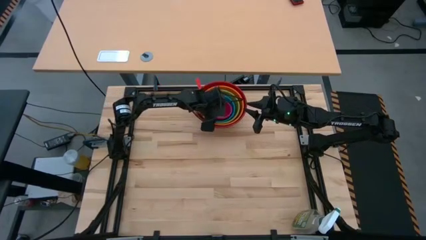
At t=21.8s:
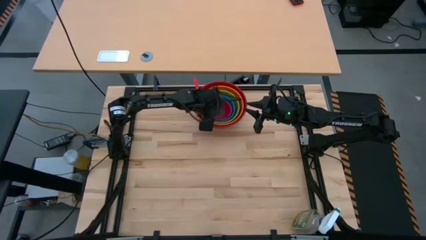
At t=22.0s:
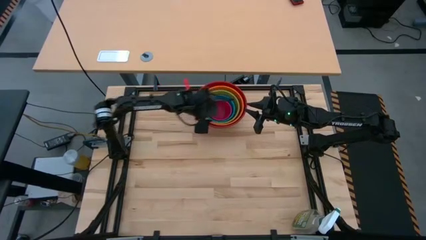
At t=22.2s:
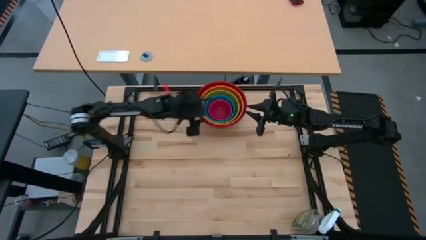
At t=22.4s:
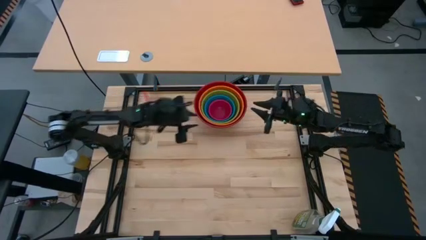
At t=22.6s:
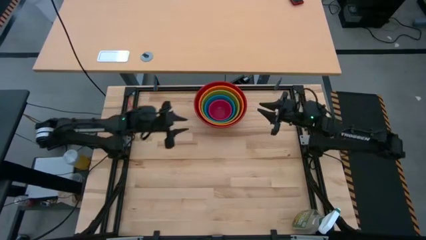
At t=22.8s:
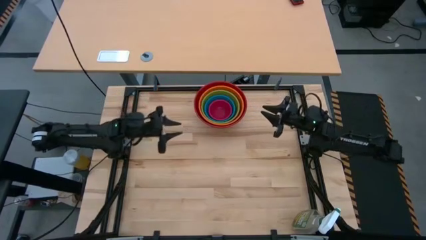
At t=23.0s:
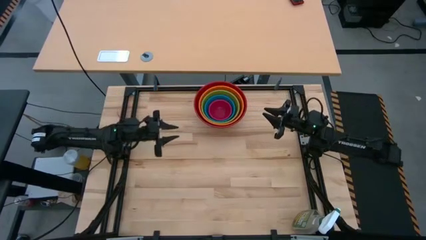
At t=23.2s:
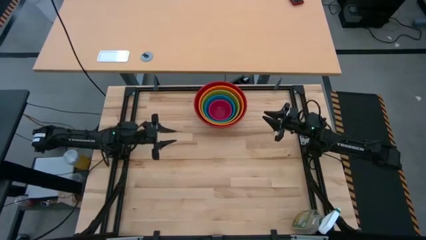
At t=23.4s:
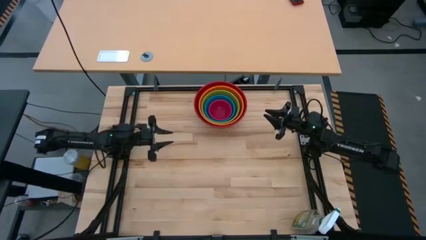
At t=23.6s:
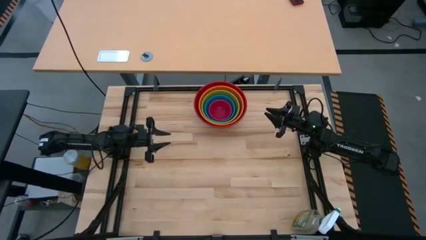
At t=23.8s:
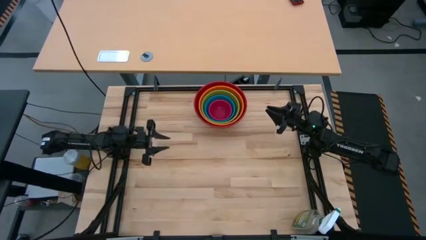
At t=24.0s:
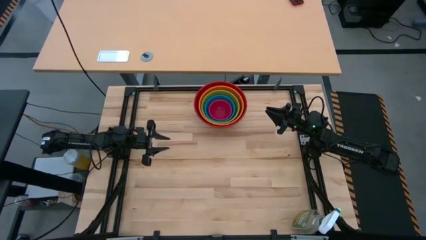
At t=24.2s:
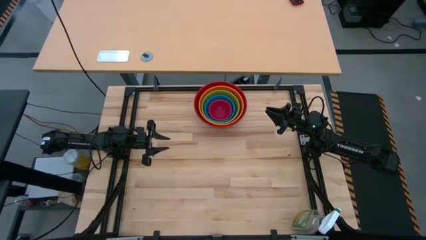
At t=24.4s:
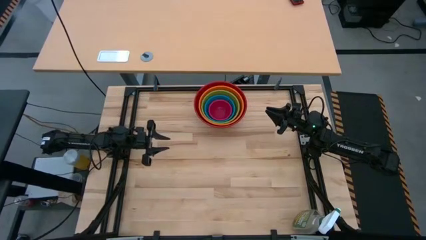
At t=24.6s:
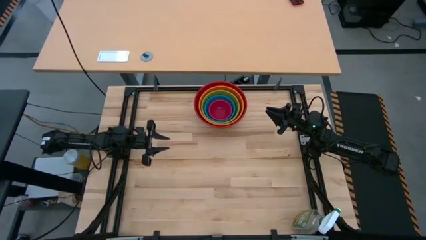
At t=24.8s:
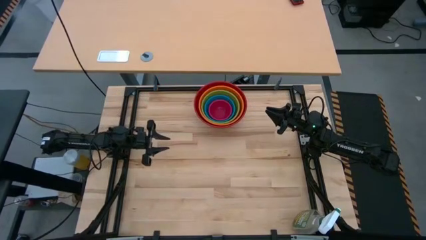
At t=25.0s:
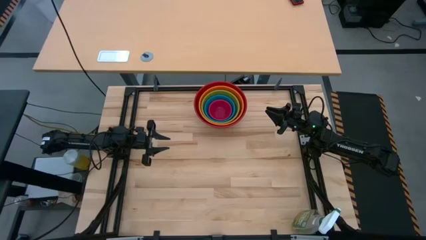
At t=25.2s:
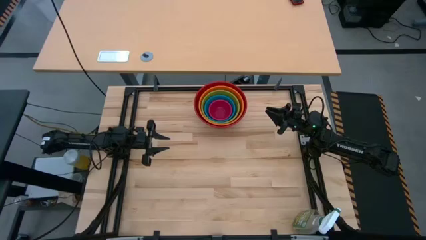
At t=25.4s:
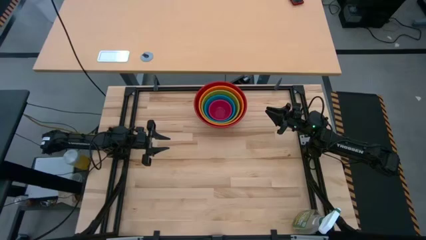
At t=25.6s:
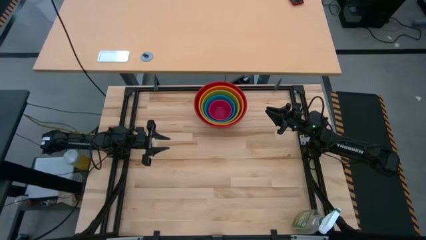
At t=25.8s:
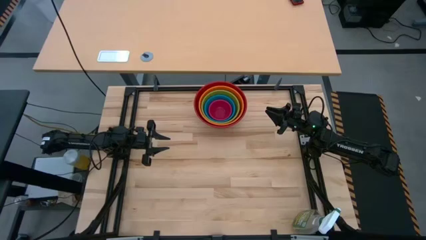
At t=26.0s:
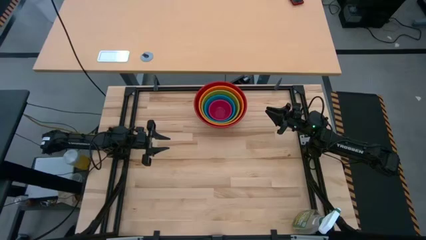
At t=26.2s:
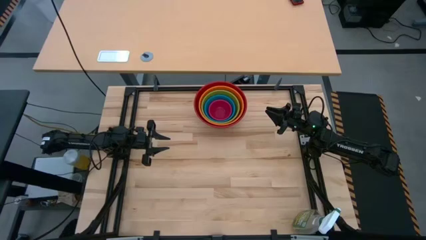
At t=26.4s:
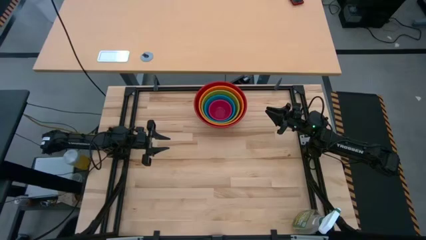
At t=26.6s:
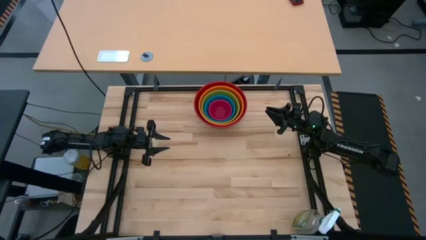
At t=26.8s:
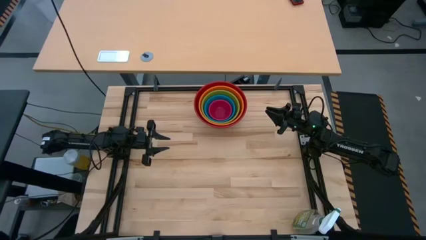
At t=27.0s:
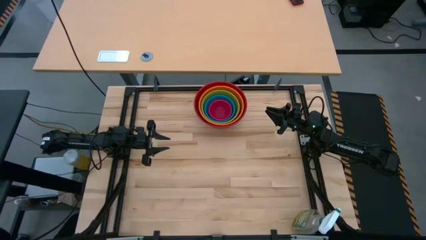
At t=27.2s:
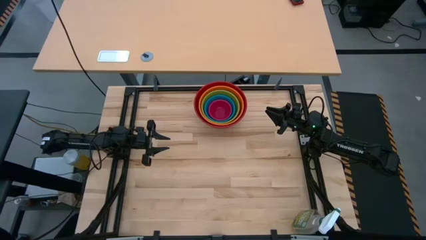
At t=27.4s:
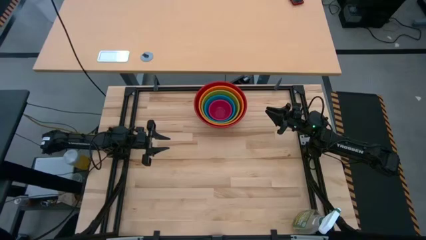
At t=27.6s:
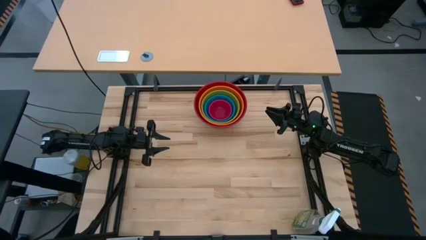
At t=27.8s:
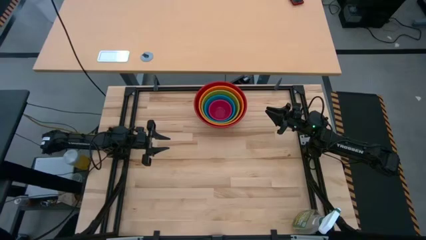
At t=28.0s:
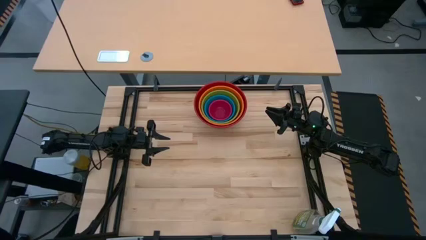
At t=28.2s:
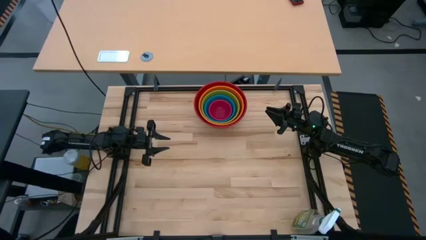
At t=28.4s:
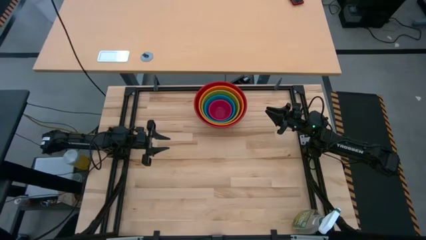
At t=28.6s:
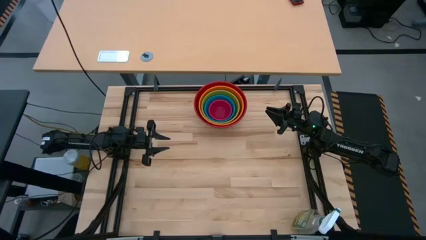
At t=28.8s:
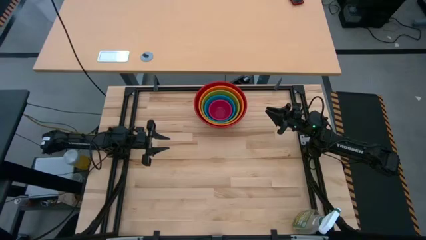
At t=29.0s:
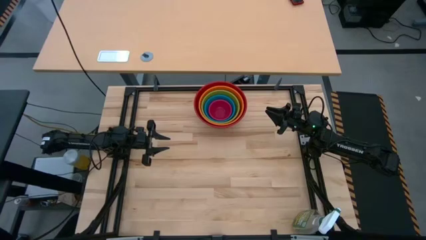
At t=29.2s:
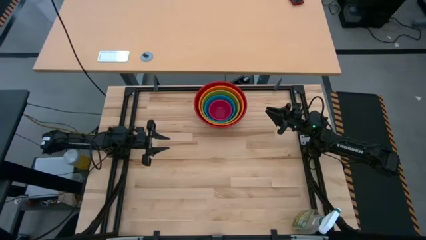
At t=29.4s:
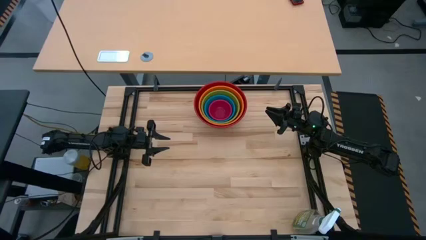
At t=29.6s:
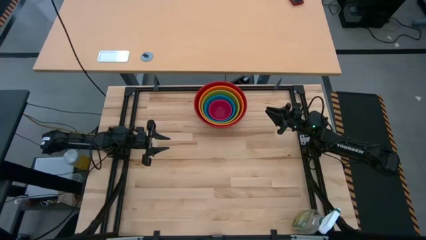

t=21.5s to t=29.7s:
Return to Home Position

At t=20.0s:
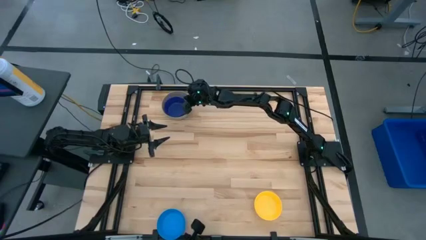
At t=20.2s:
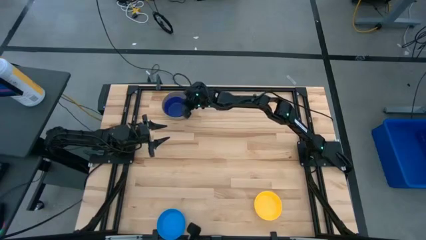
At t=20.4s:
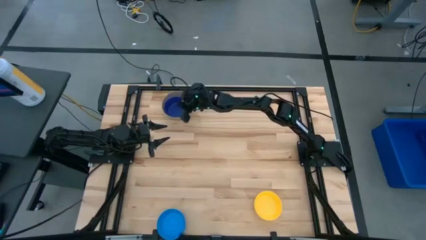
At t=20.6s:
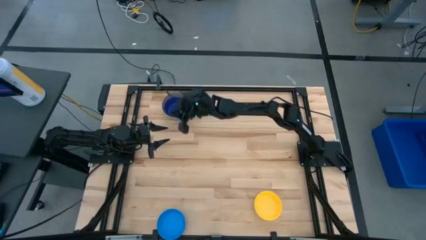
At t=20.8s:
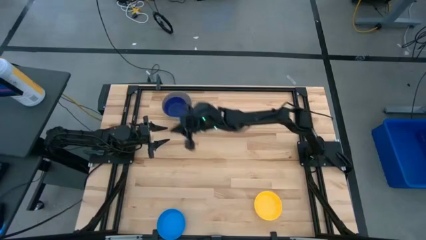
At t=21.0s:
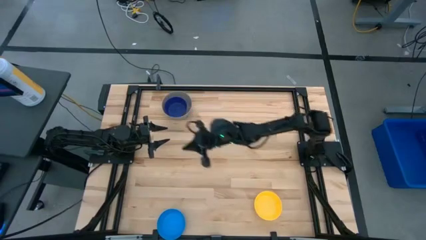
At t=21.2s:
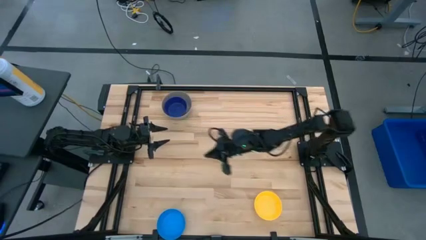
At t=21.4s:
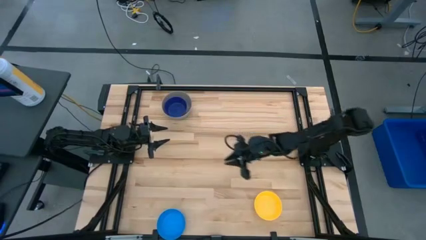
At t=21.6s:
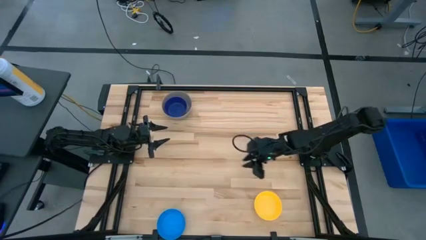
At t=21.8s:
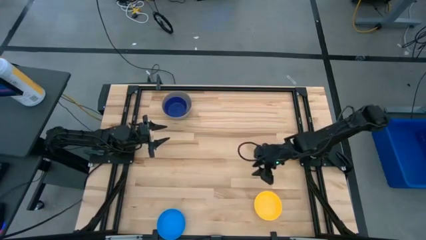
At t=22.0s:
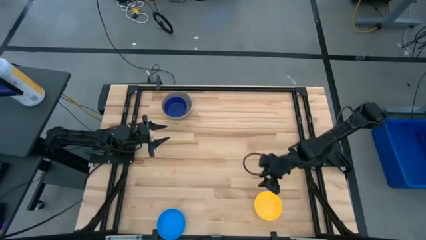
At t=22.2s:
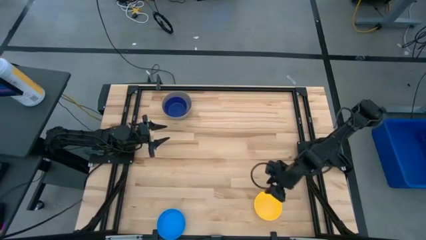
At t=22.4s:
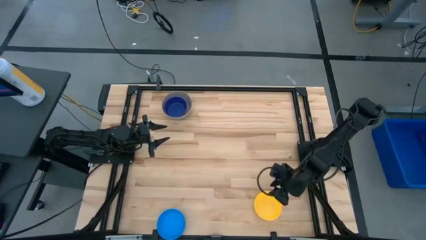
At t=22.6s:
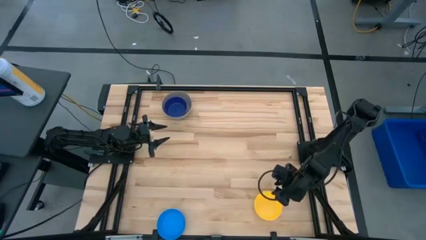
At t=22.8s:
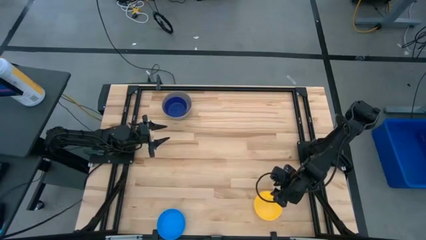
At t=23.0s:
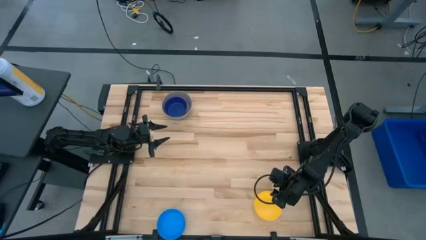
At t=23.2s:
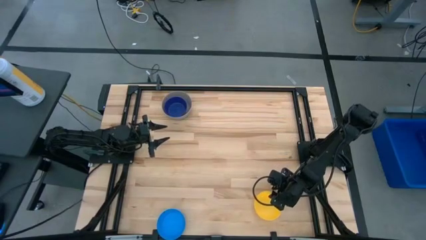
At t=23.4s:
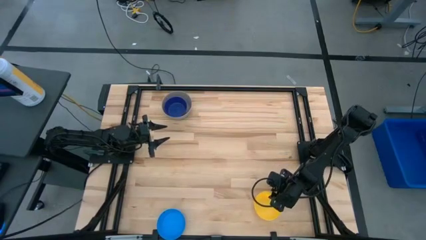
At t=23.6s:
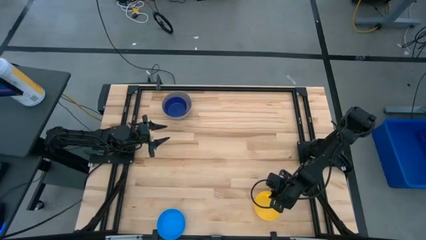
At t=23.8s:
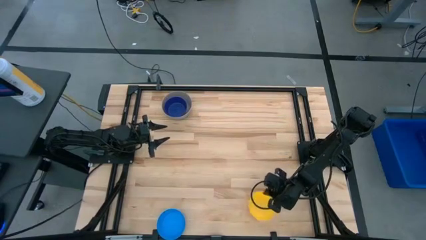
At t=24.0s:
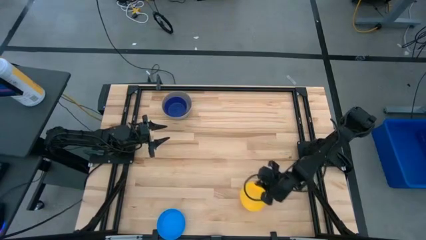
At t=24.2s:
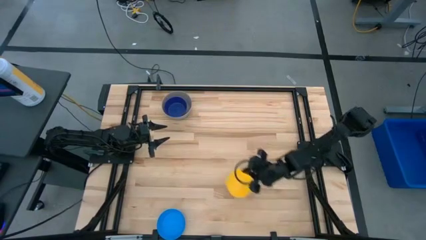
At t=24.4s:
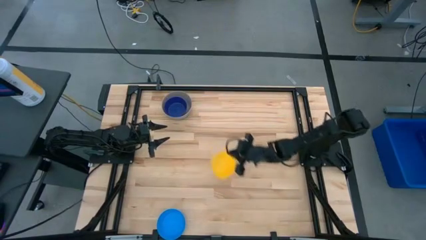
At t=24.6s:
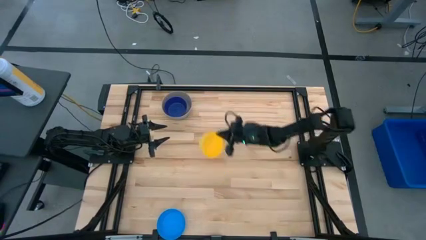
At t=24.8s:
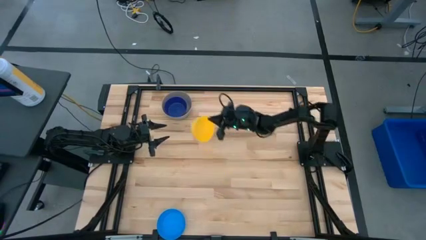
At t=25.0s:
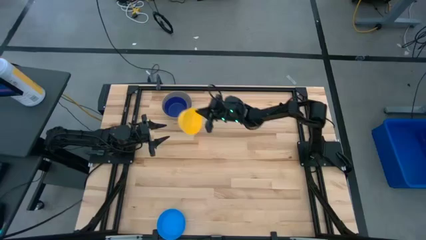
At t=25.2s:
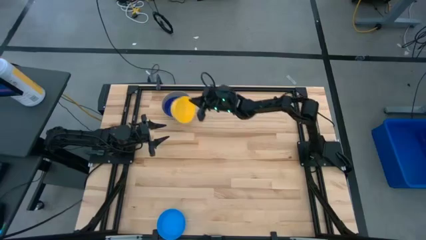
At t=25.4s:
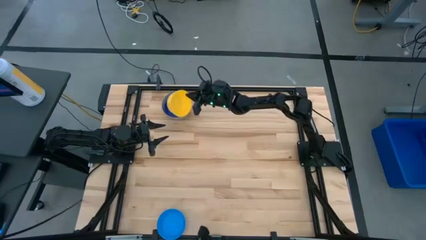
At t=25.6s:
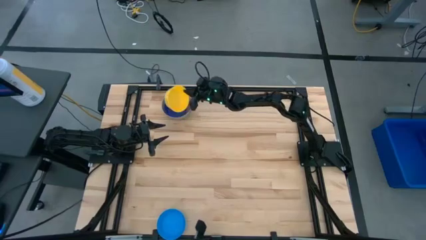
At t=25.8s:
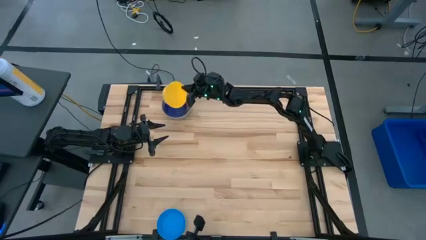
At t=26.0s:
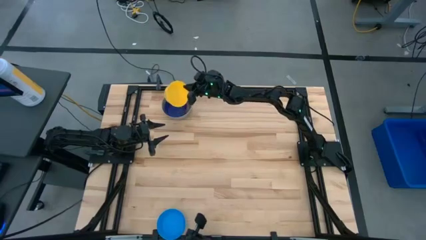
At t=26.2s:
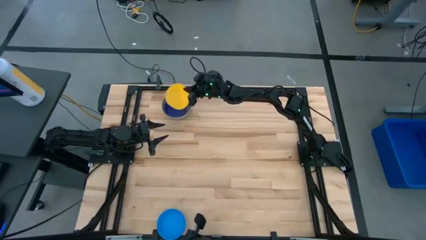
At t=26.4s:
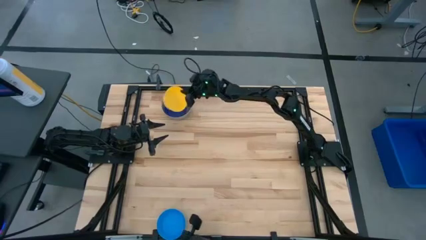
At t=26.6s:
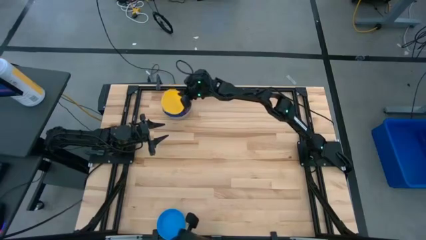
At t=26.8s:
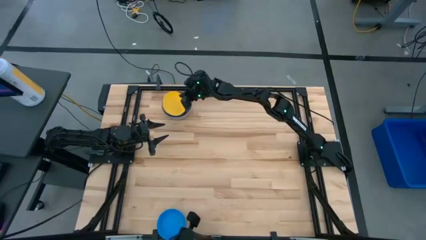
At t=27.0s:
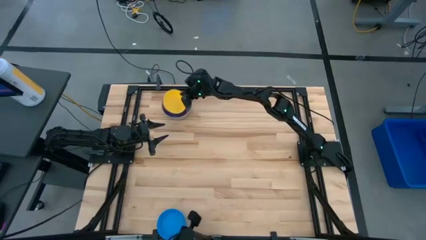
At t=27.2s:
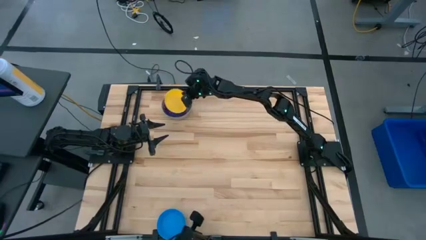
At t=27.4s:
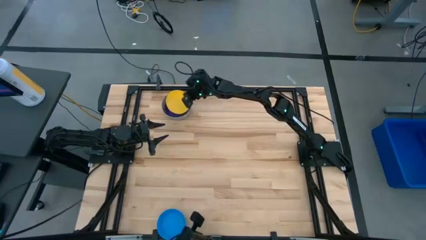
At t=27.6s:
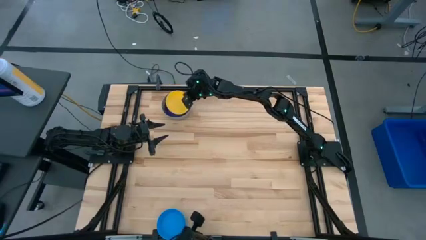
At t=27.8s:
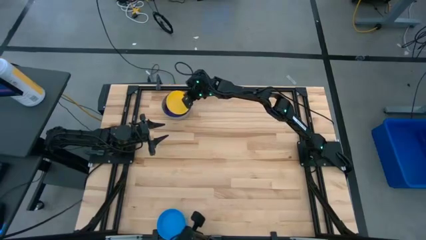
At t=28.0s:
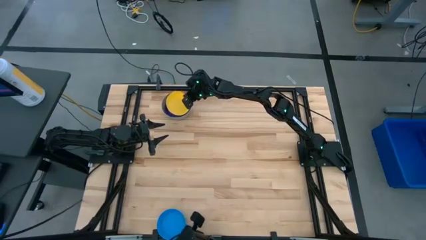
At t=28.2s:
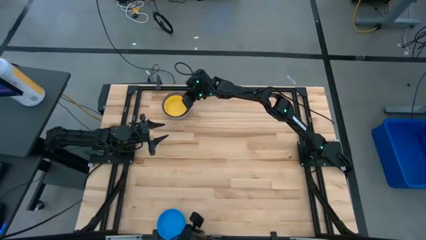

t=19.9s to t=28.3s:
Stack the yellow bowl into the blue bowl
